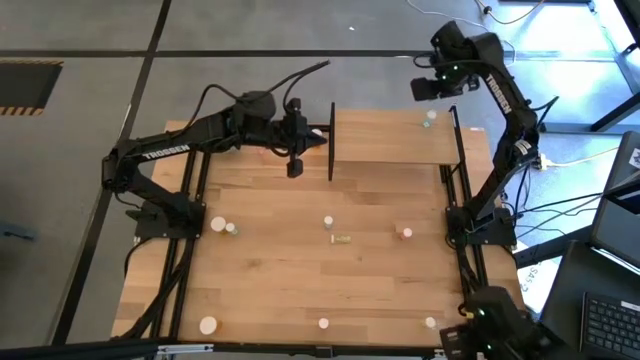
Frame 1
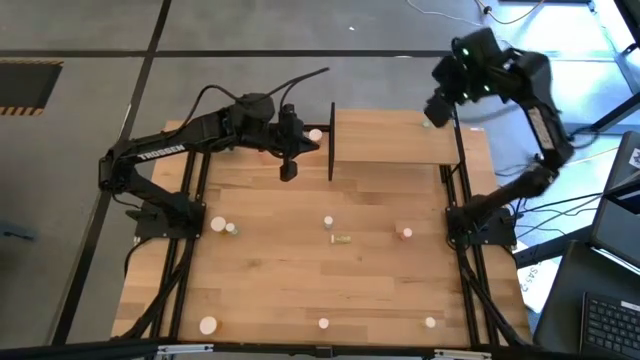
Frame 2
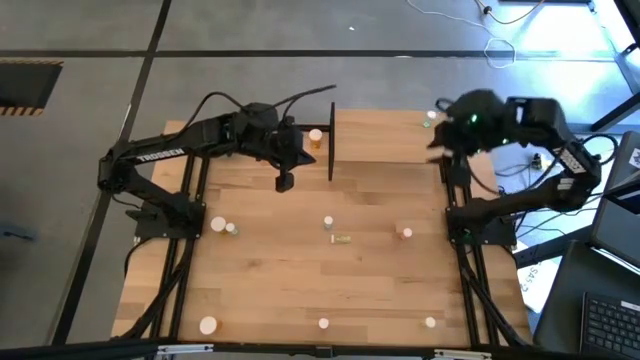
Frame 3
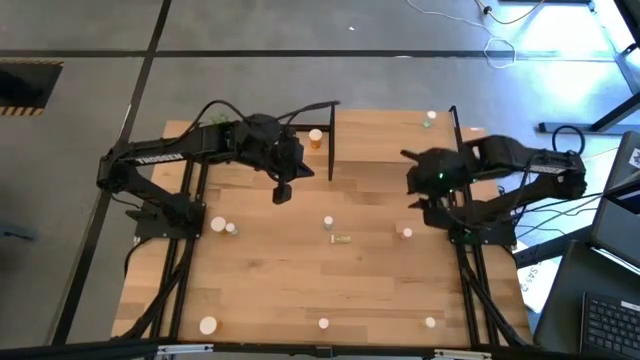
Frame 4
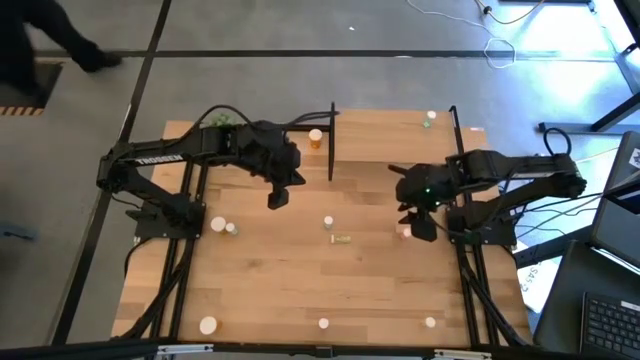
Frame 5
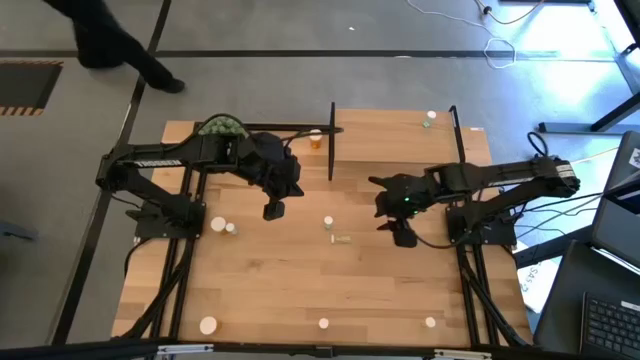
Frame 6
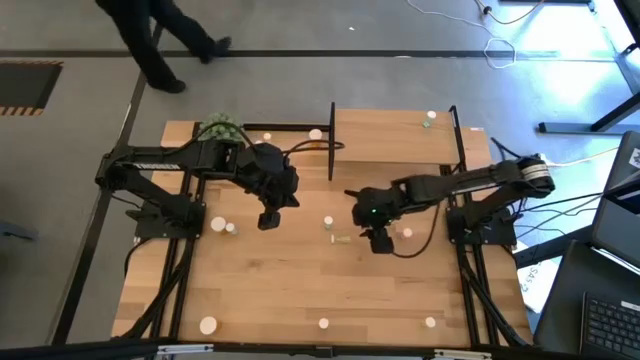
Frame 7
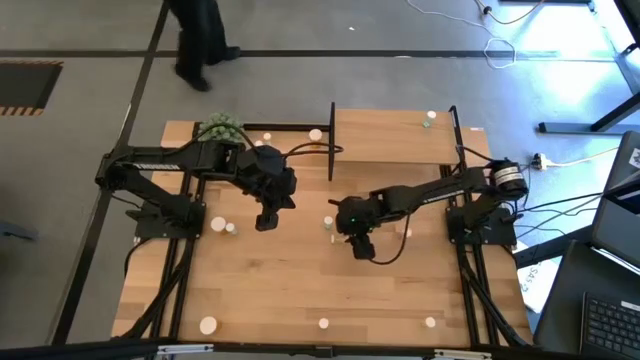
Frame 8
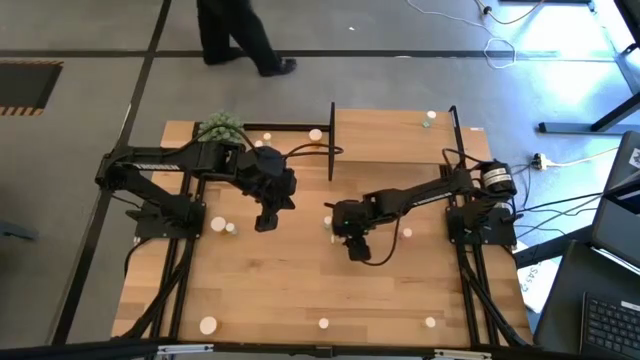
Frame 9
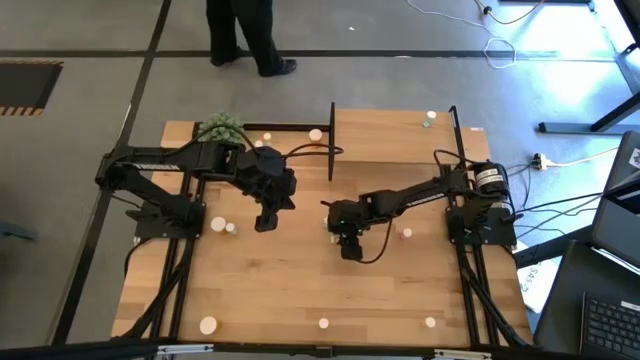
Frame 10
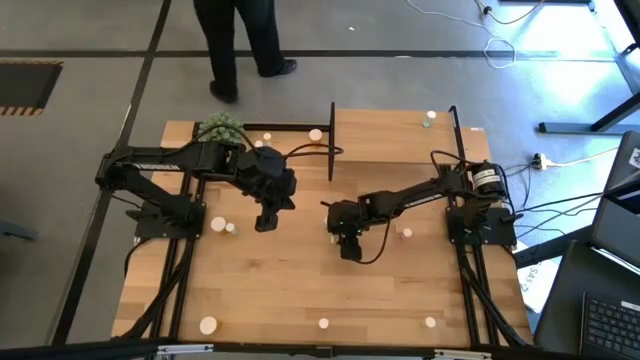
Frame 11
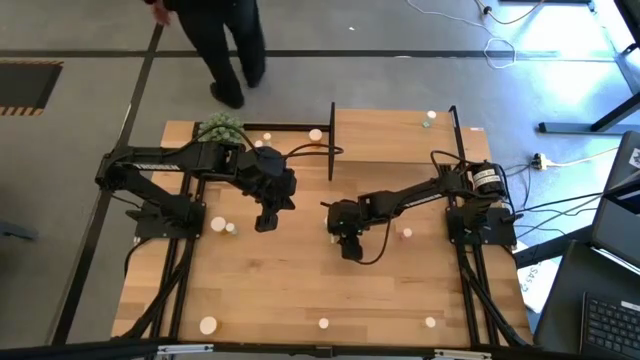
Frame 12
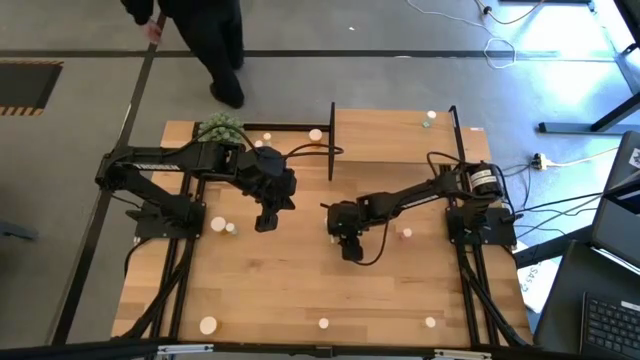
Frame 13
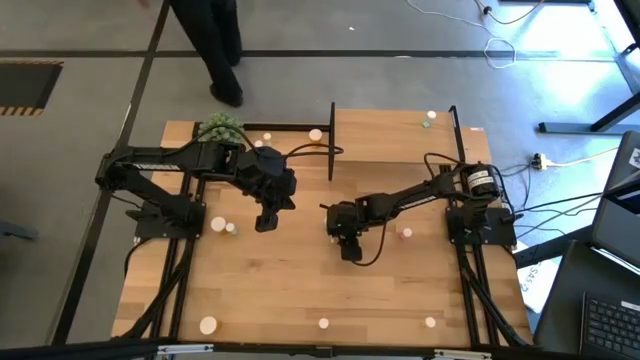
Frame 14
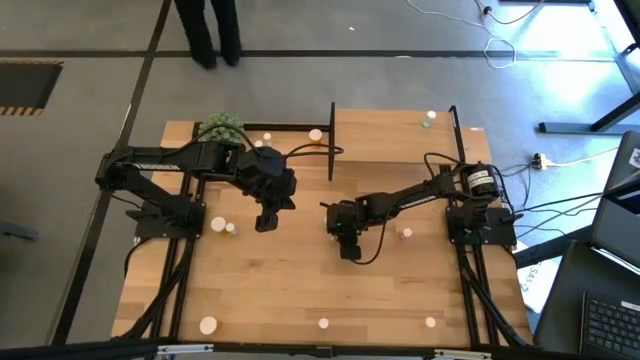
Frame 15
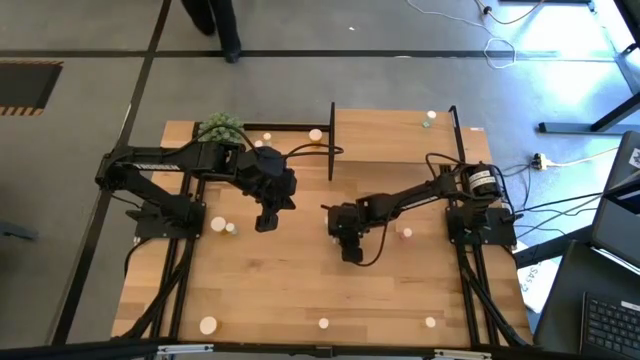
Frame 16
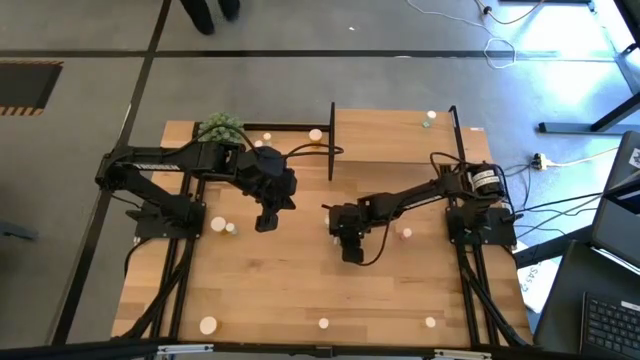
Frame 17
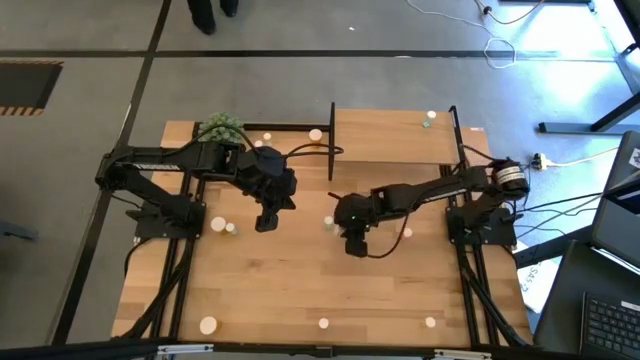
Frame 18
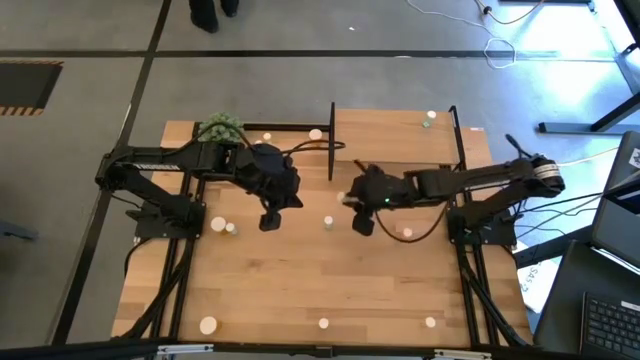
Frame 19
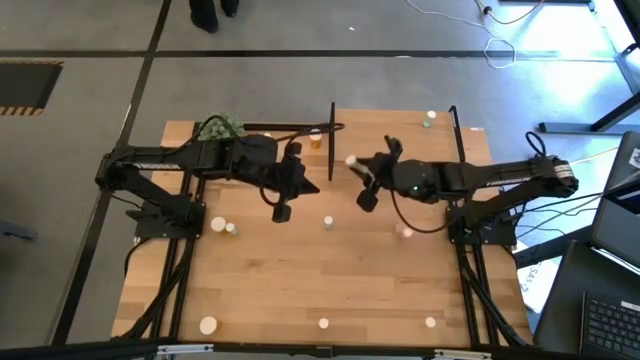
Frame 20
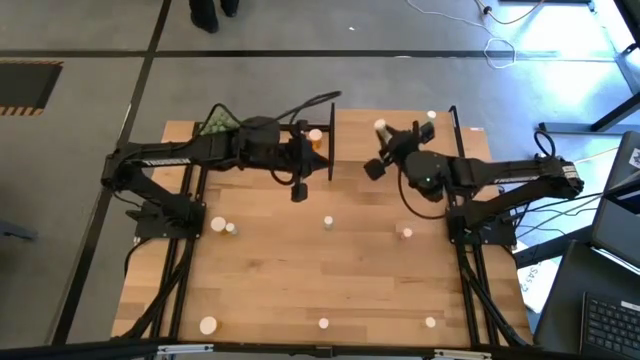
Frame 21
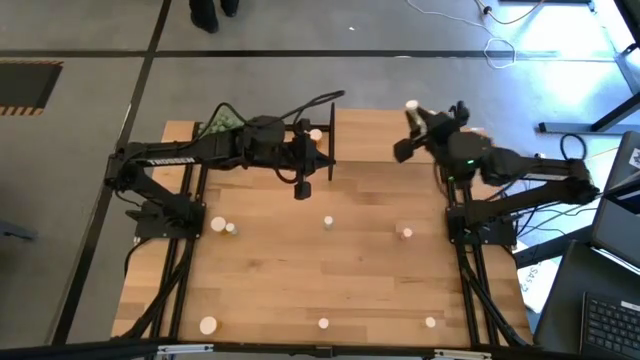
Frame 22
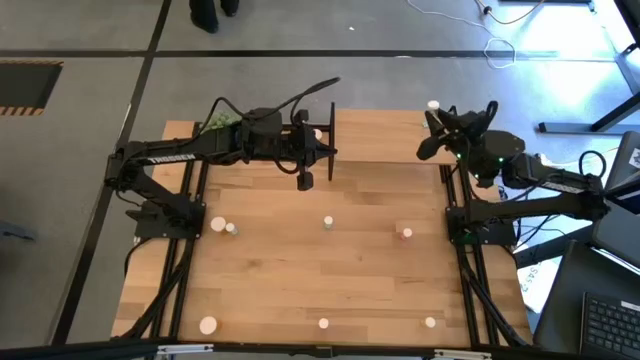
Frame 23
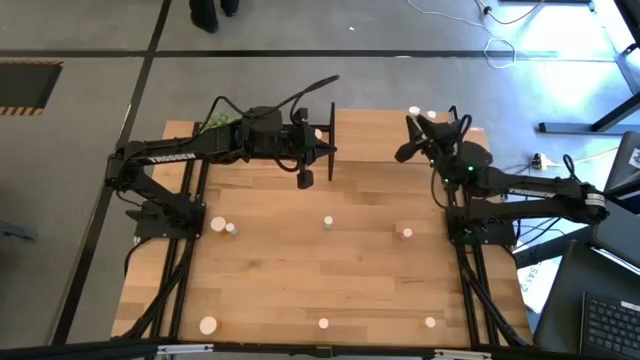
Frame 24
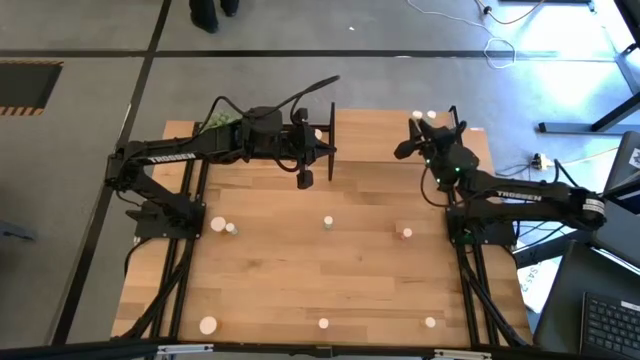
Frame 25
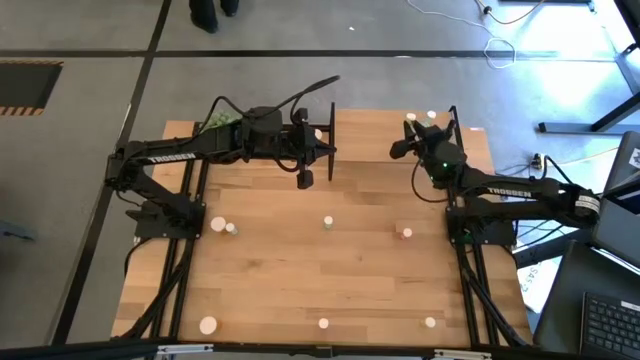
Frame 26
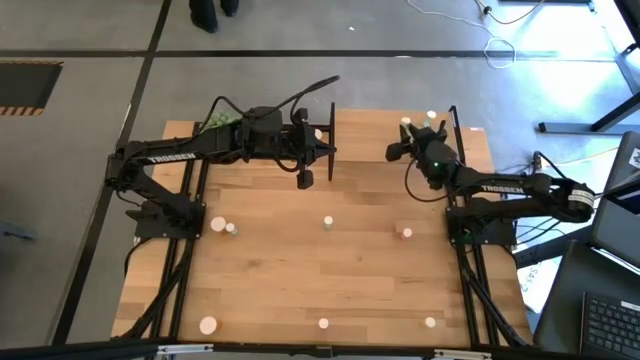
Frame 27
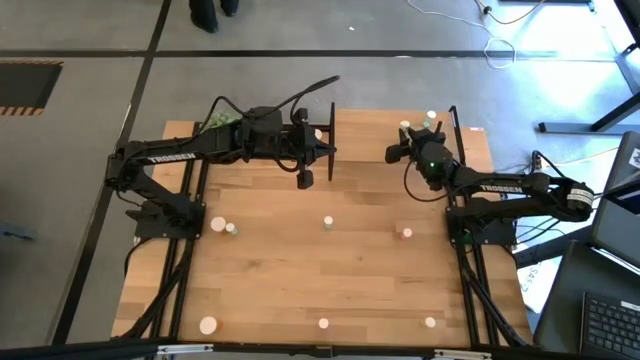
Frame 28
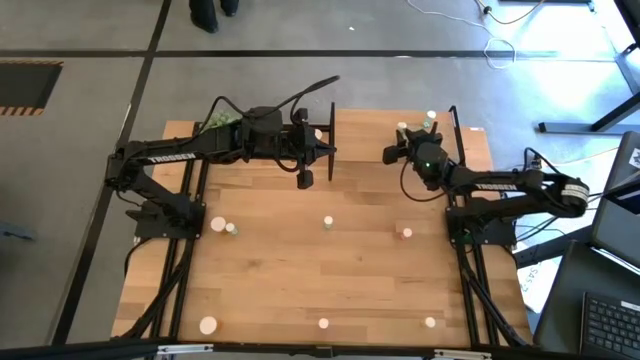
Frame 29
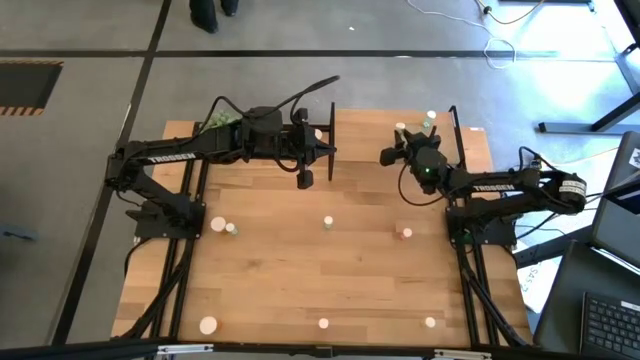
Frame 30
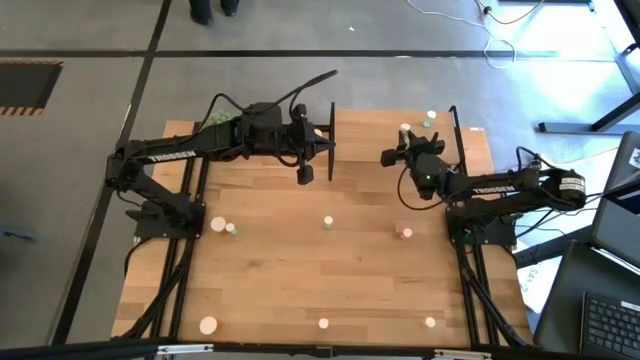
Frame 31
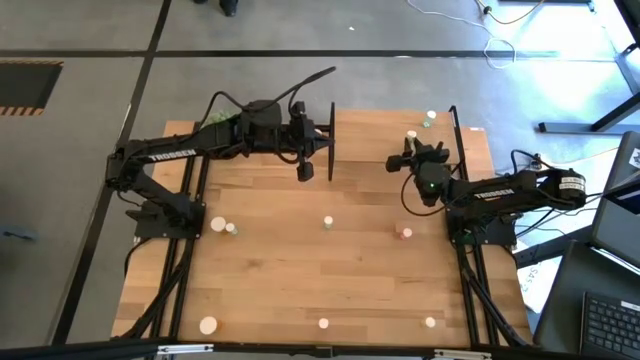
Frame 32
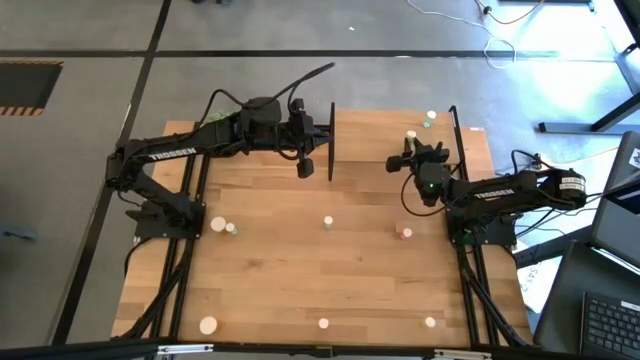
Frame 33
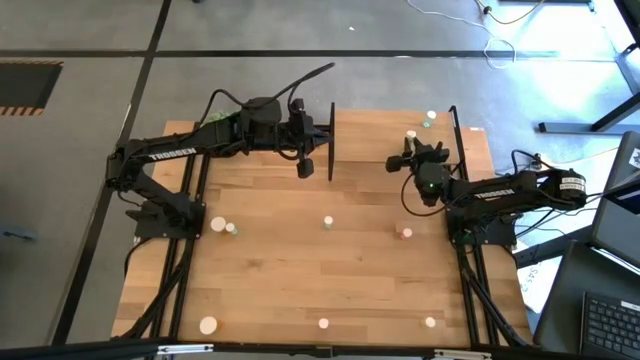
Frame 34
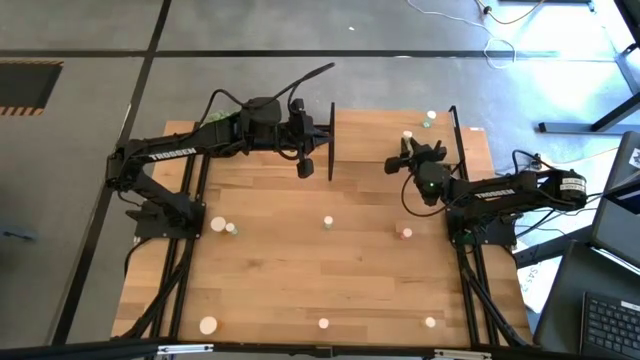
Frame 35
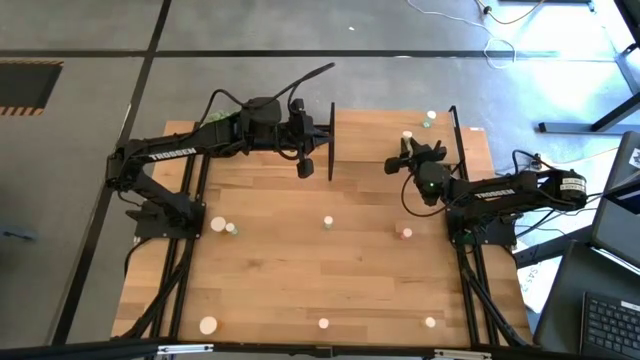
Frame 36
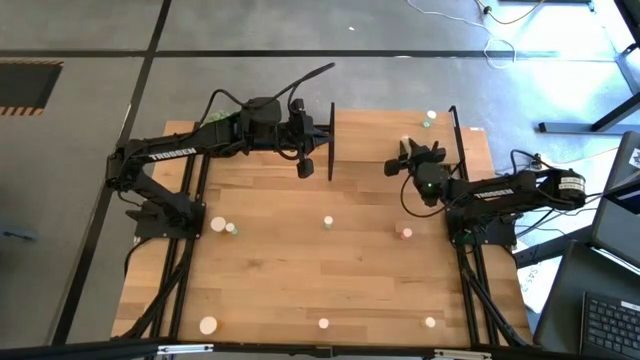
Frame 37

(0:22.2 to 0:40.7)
Task: Pick and place medicine bottles onto shelf by color
Put the middle yellow pill bottle on the shelf

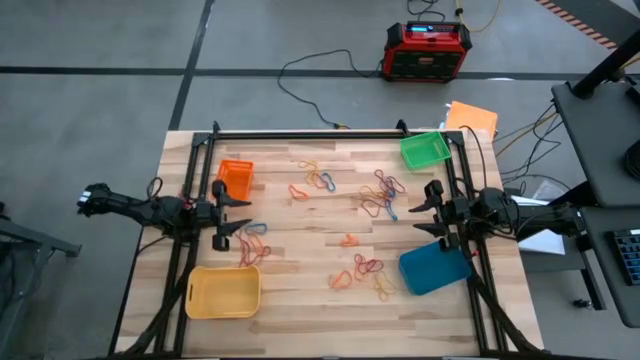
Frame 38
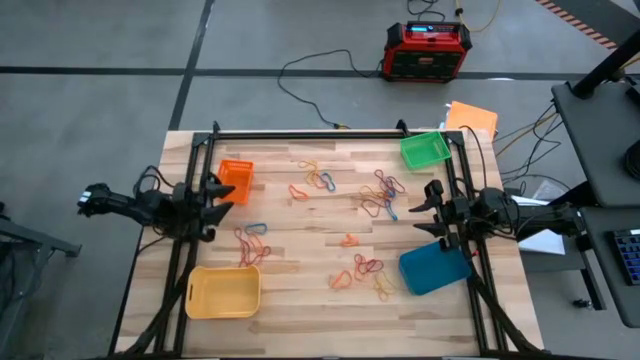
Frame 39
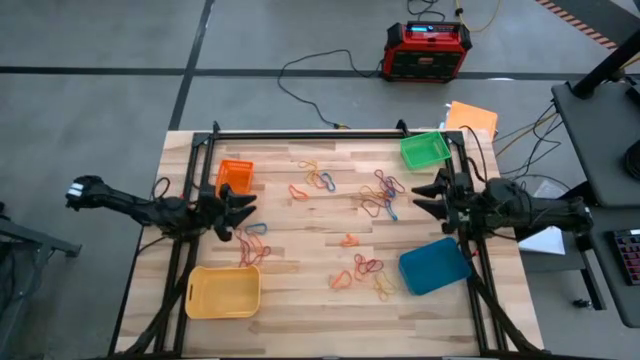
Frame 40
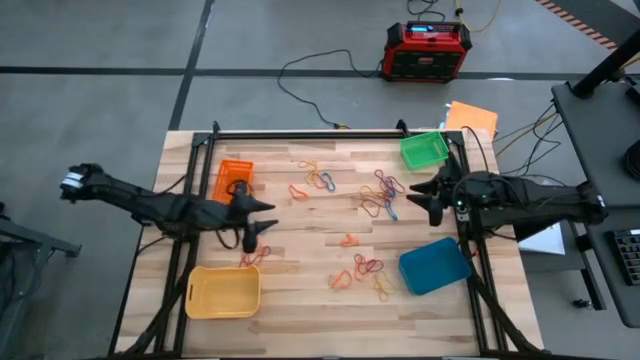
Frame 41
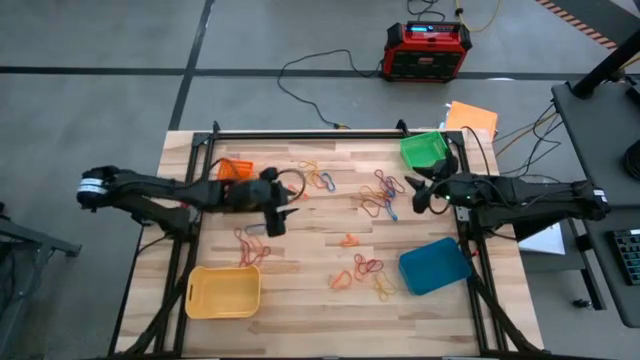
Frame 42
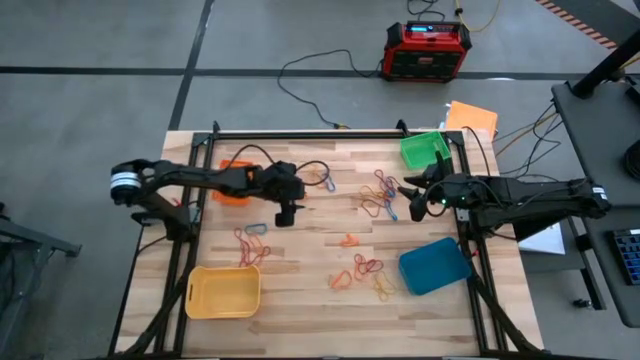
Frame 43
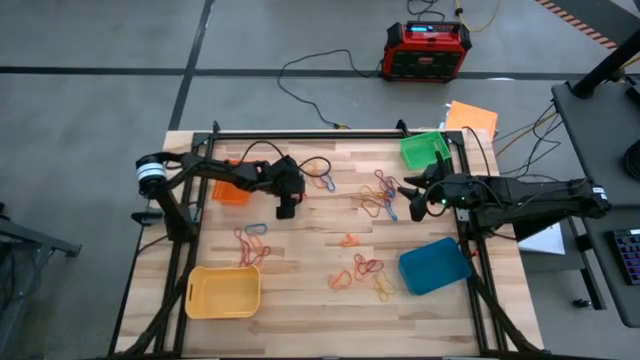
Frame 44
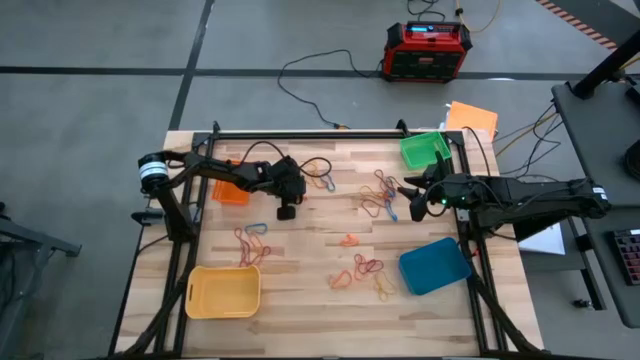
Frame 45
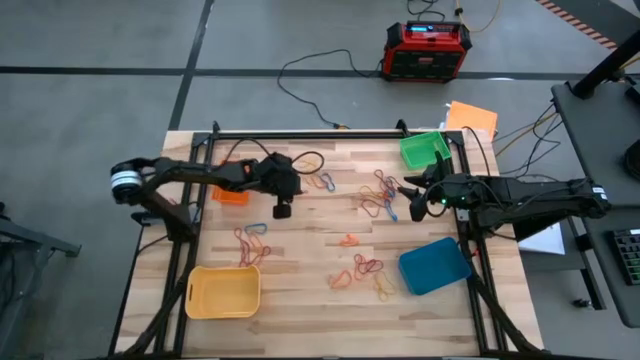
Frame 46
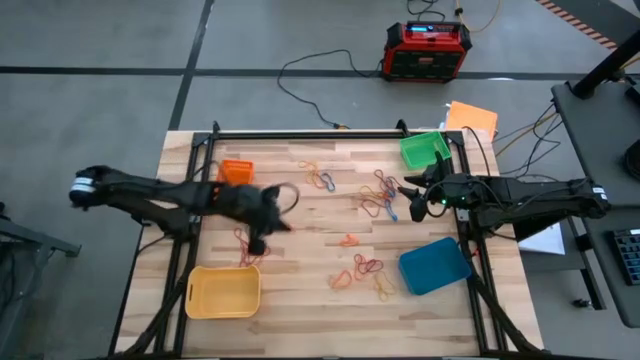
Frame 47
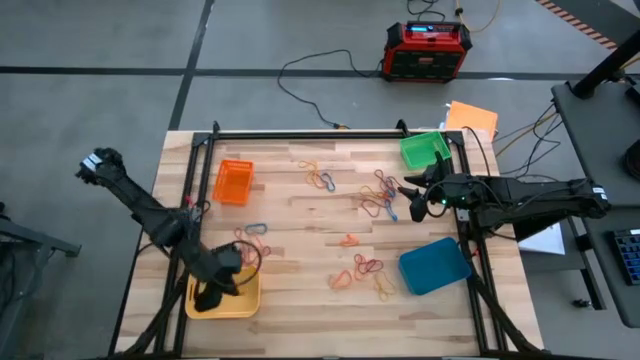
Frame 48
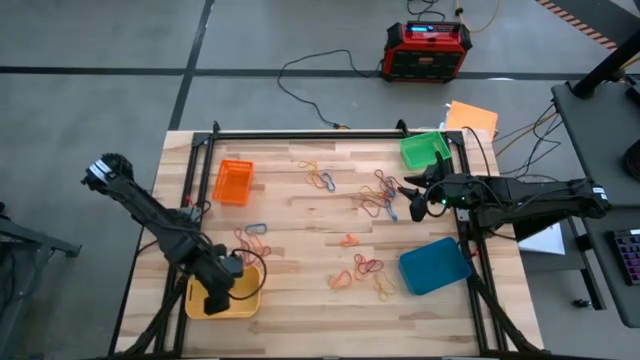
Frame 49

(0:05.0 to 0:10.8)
Task: Sort rubber bands into baskets
Put the orange rubber band into the yellow bin
